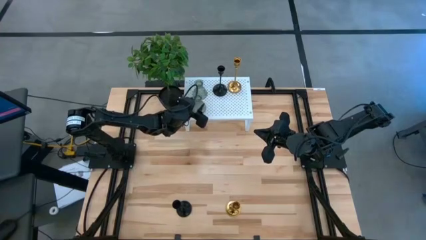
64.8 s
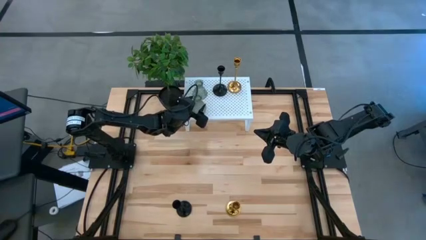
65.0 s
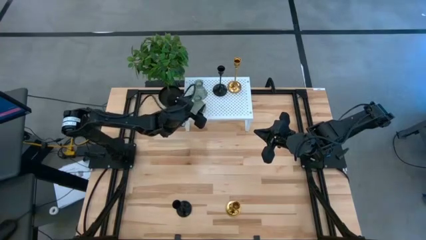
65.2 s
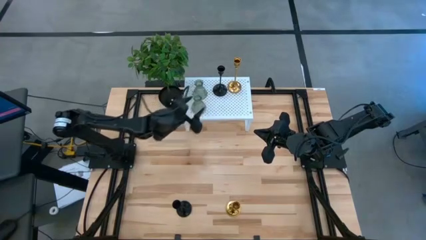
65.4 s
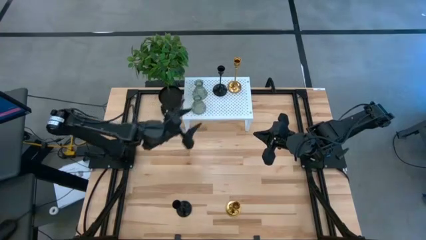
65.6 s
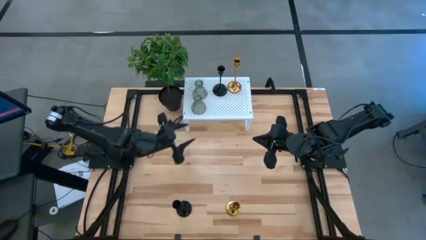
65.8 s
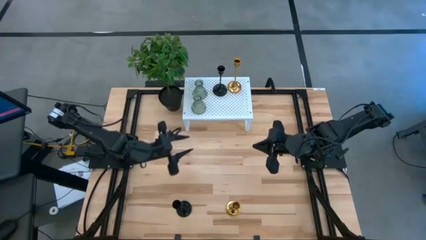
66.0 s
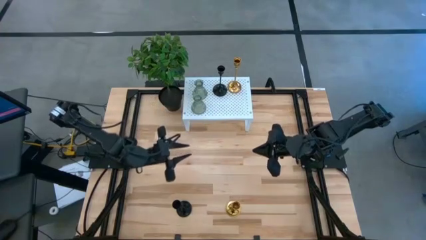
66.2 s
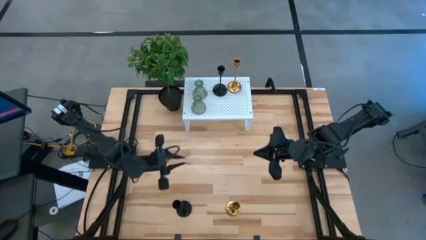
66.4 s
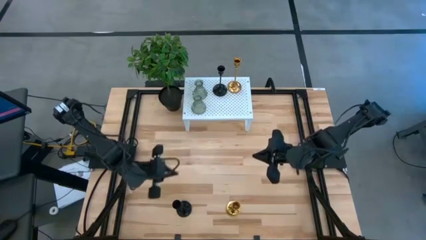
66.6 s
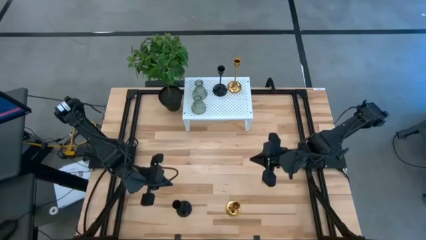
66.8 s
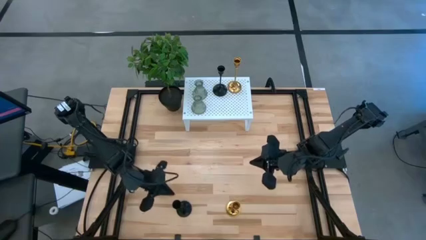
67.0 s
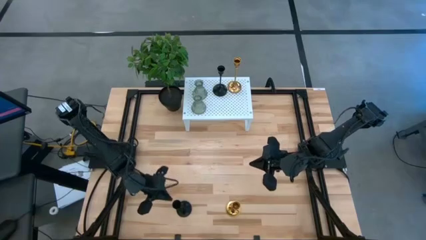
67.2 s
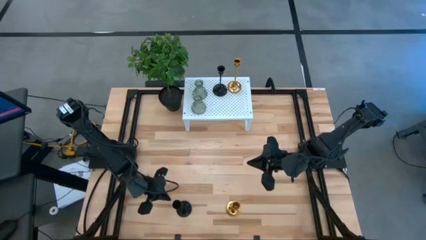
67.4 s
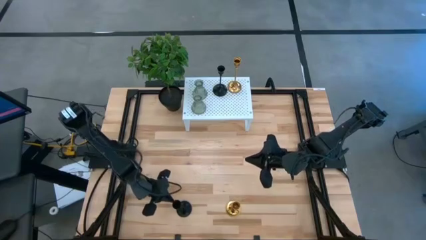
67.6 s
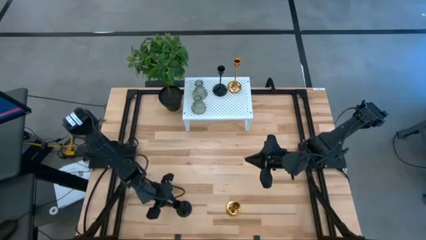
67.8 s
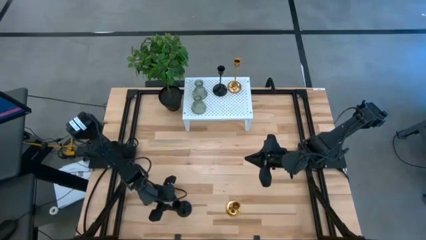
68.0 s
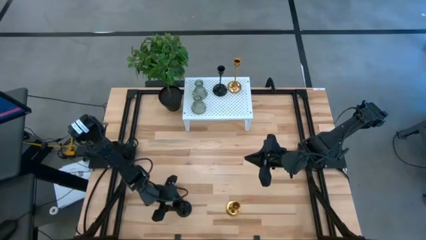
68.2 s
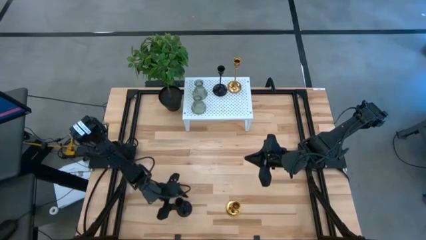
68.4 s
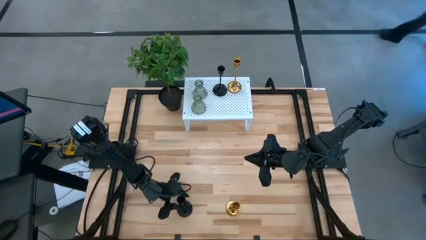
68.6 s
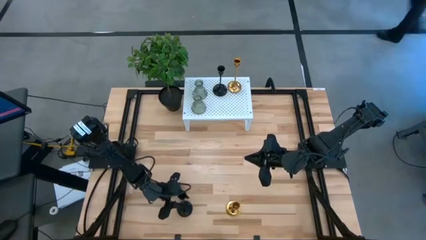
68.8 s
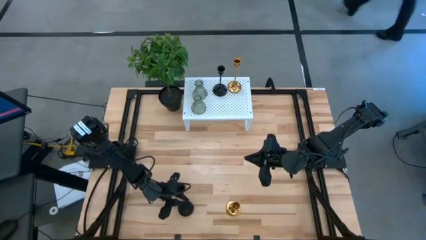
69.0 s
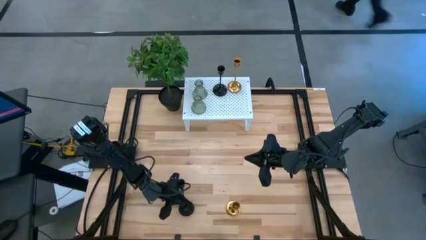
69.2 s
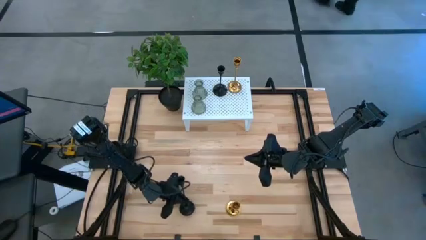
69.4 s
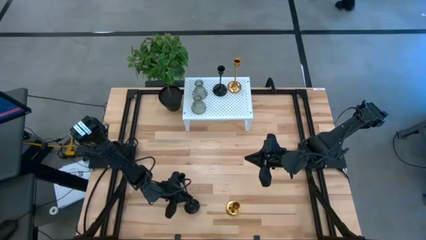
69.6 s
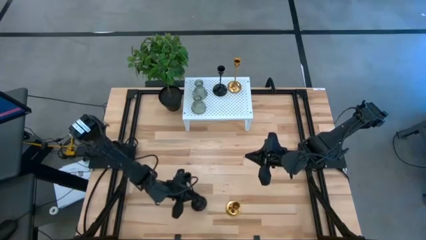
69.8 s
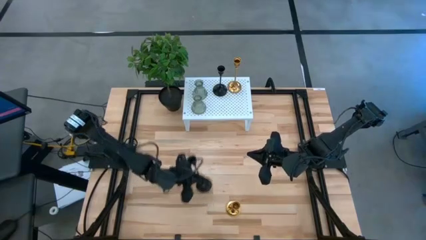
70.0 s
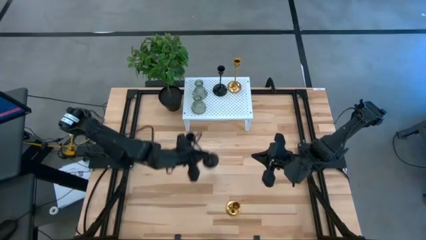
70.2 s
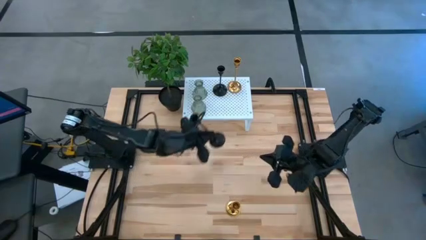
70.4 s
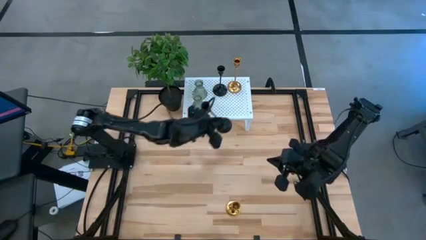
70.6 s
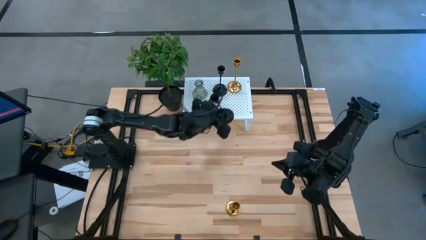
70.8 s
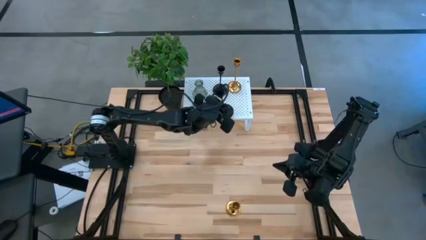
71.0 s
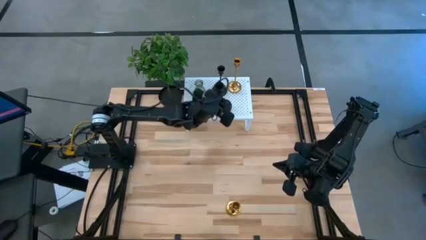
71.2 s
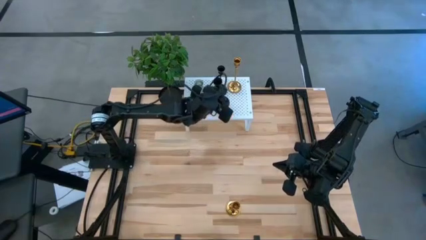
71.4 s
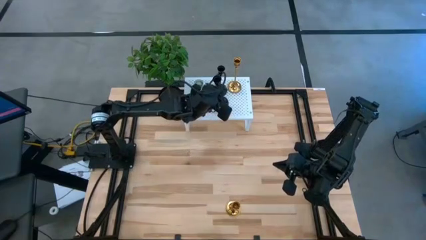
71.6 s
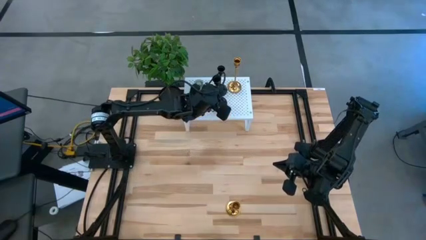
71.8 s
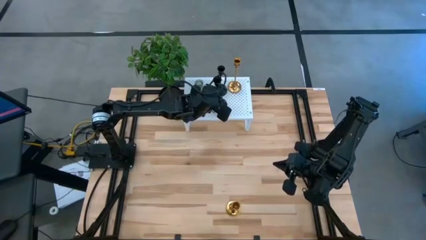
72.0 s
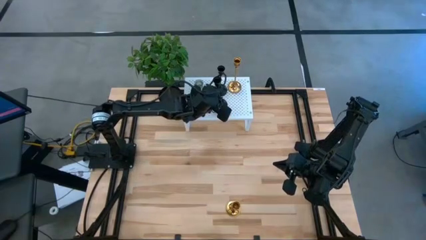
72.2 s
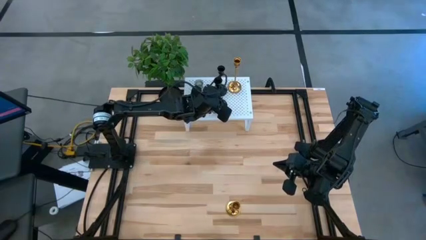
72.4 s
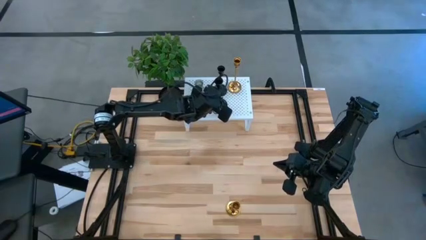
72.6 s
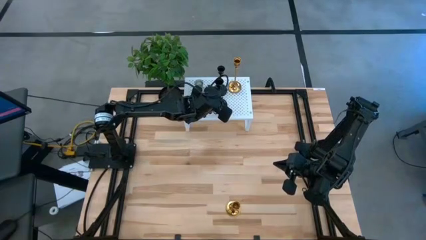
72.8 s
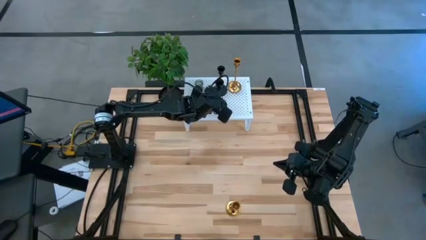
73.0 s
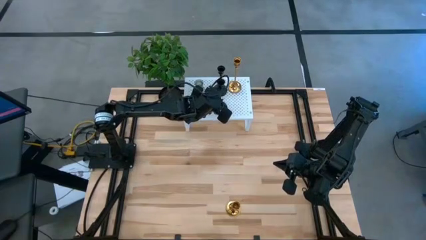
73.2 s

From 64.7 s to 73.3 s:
Task: Pick & Place candle stick holders
Put the black candle holder on the shelf aligned with the other black candle holder

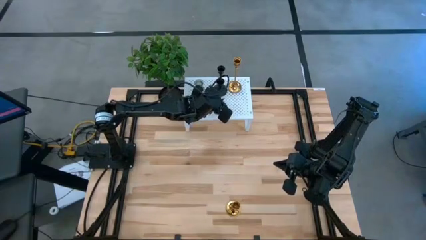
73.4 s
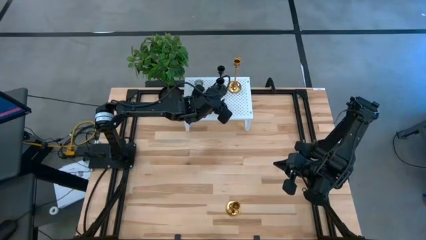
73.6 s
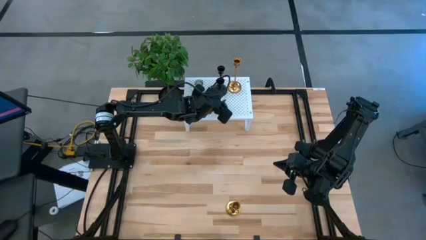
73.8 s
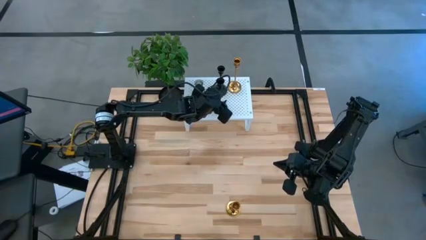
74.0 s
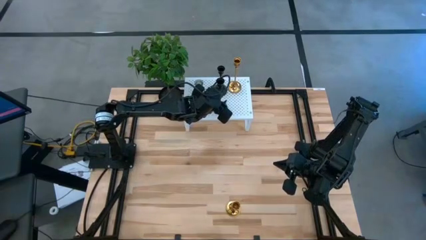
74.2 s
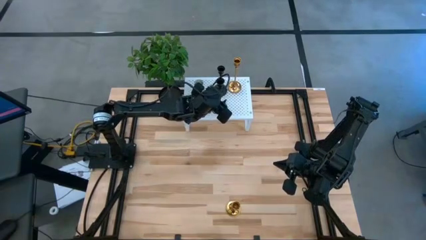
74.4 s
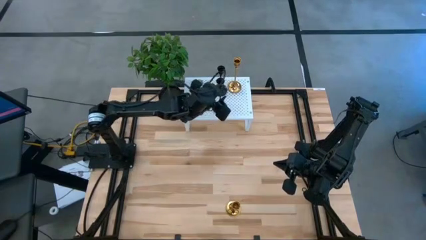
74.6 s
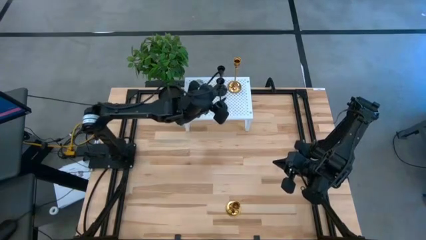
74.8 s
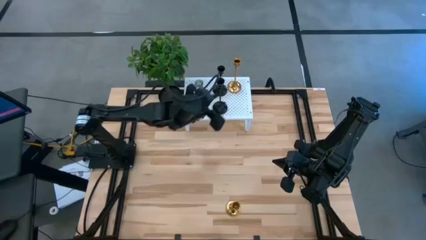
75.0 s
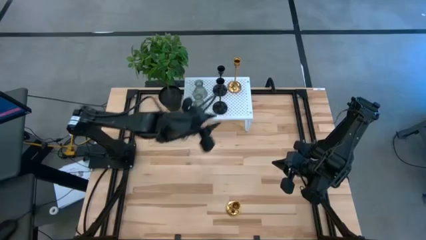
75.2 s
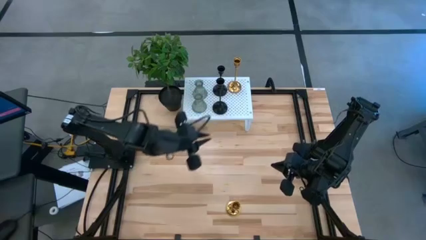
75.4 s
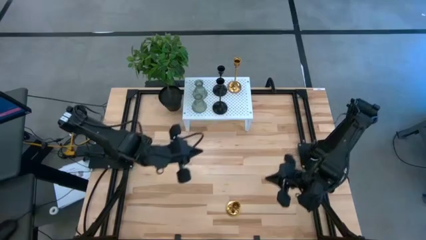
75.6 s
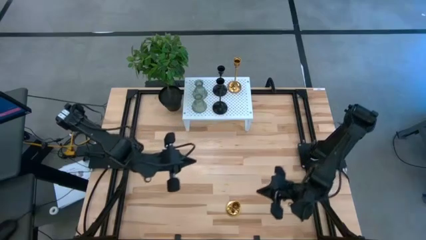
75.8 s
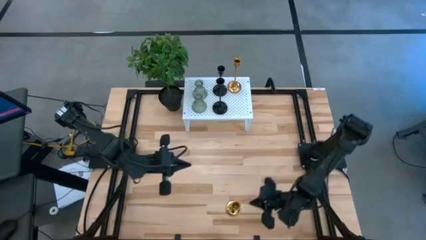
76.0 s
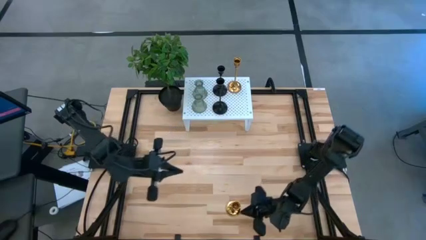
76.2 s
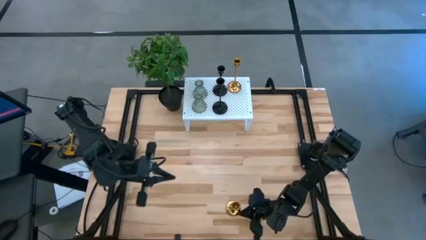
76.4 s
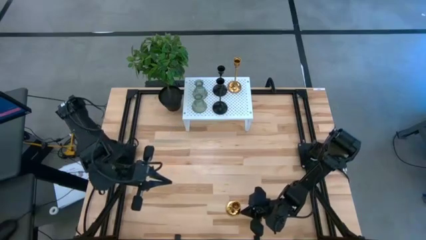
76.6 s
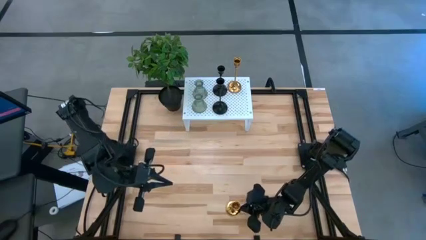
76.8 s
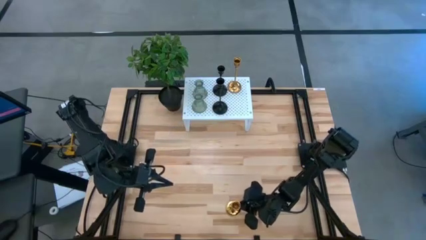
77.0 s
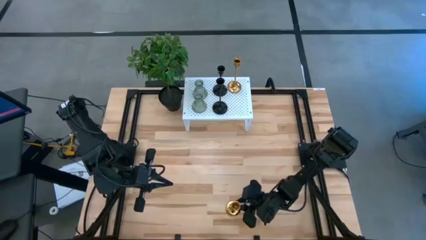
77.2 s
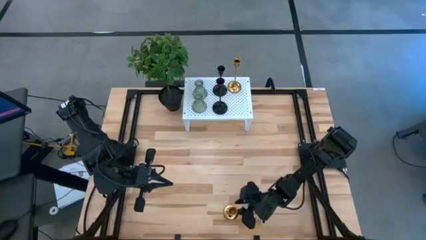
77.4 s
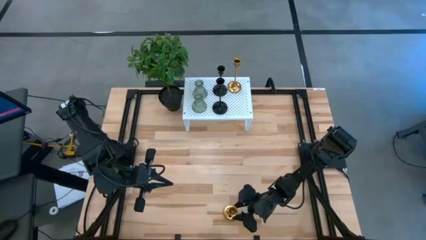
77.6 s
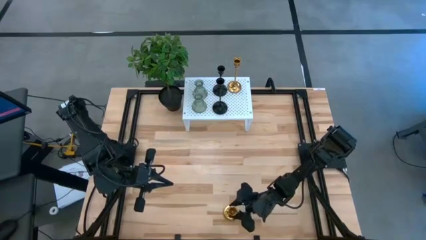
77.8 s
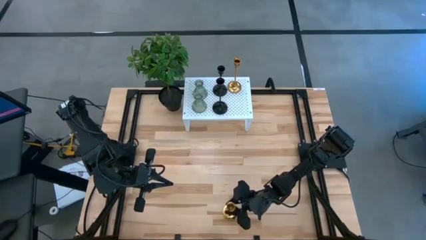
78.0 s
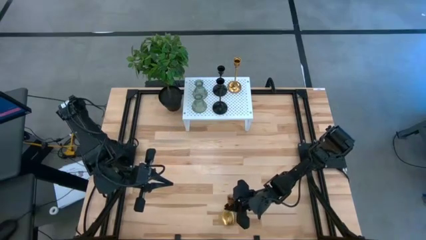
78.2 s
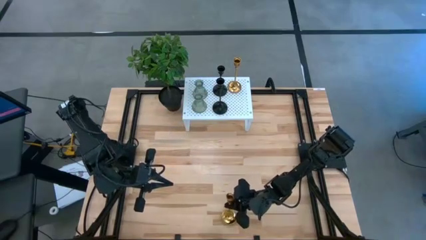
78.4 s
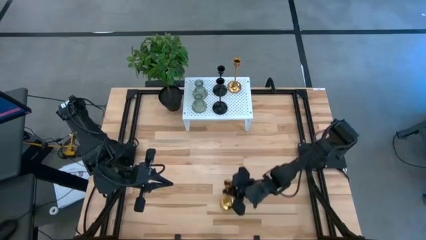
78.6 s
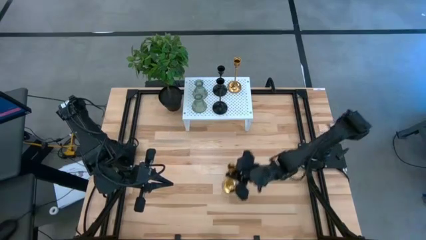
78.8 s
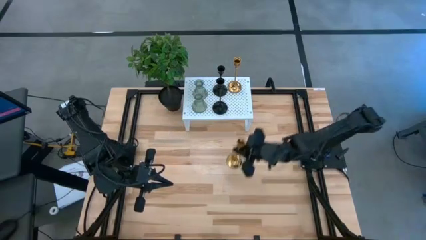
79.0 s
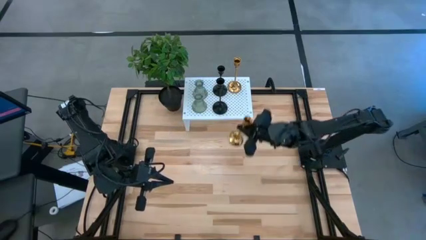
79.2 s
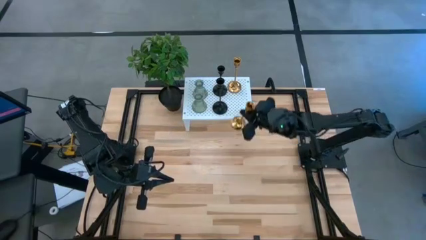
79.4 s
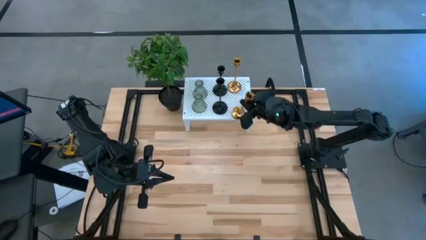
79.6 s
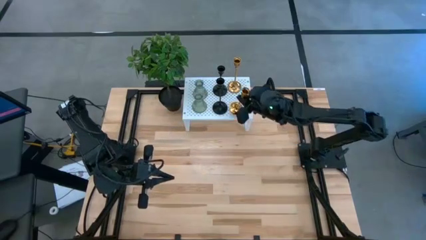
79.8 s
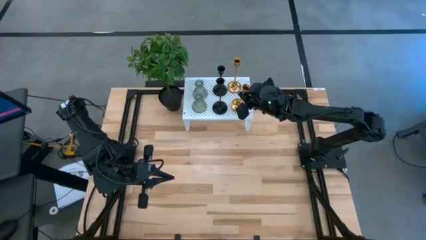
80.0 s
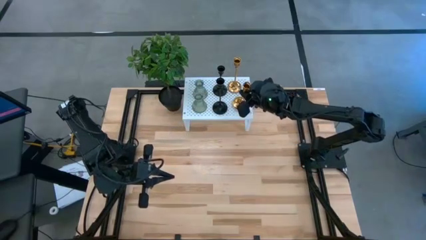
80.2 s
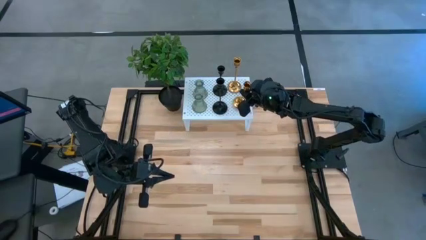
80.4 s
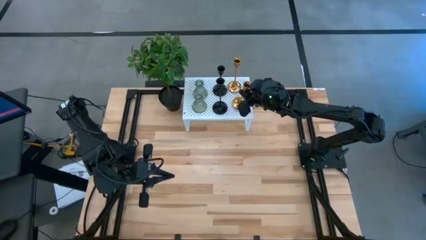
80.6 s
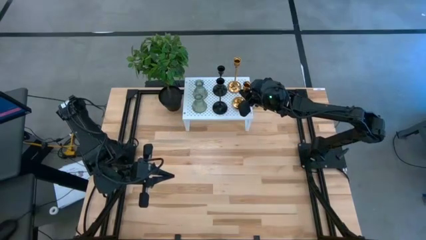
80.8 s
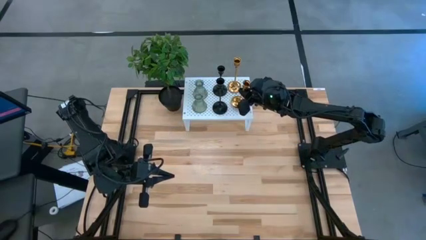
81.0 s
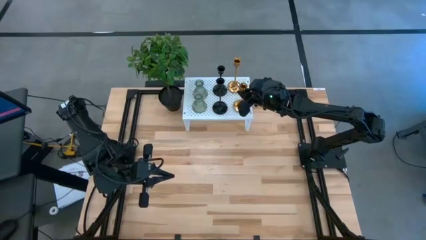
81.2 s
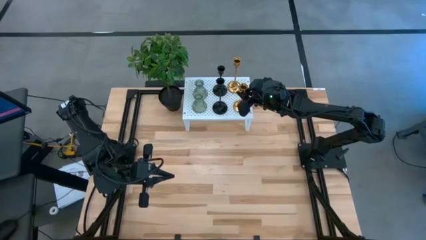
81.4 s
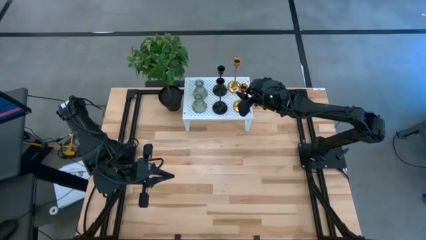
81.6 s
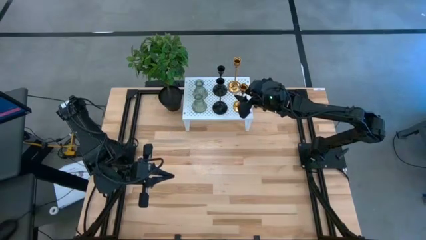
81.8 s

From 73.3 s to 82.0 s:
Put the gold candle holder on the shelf aligned with the other gold candle holder
